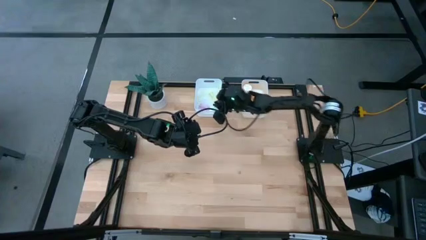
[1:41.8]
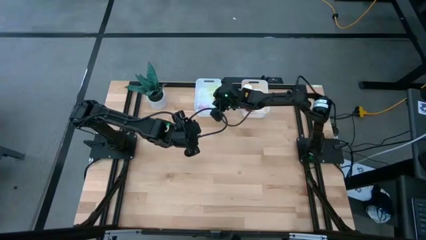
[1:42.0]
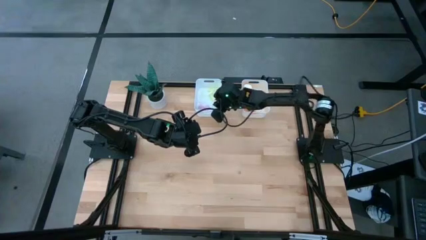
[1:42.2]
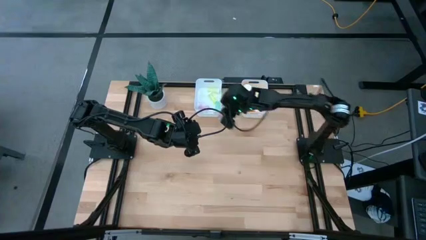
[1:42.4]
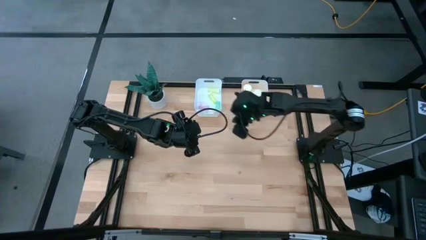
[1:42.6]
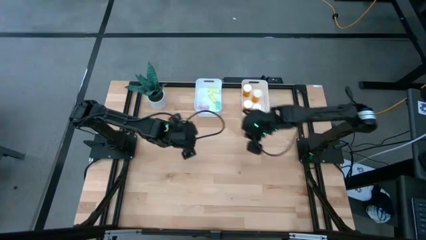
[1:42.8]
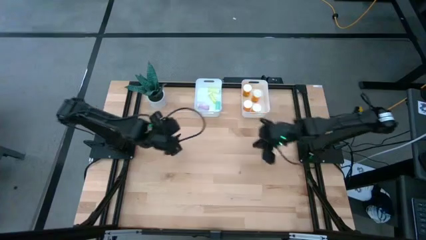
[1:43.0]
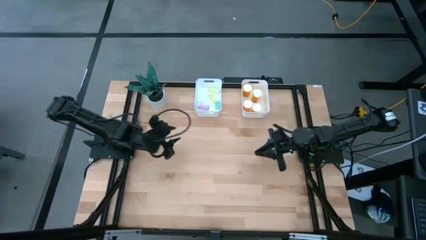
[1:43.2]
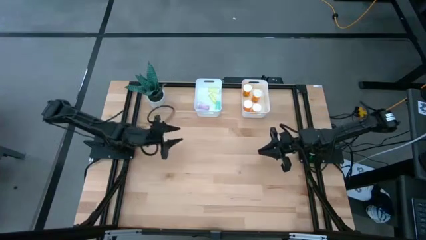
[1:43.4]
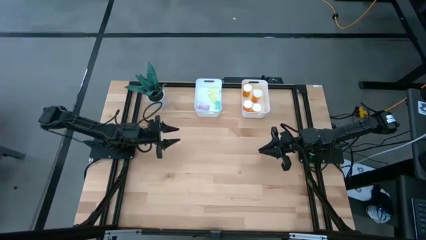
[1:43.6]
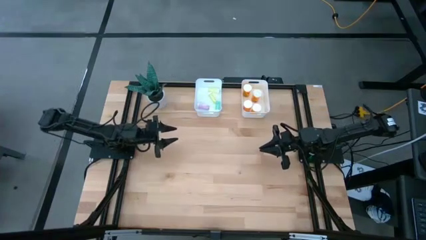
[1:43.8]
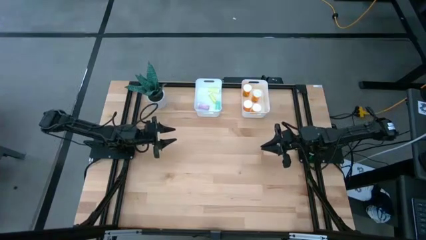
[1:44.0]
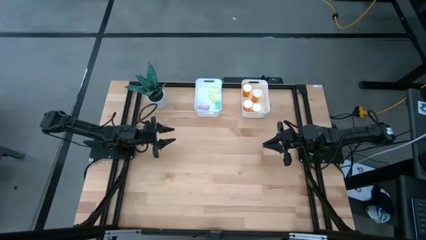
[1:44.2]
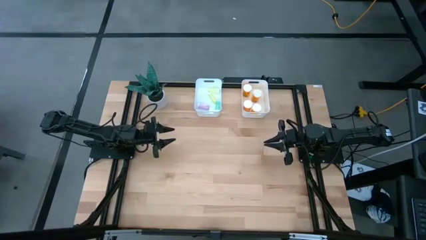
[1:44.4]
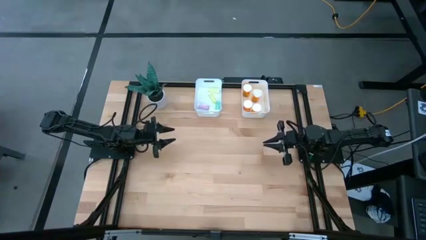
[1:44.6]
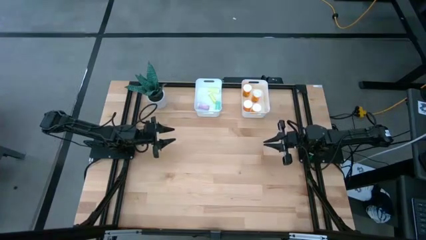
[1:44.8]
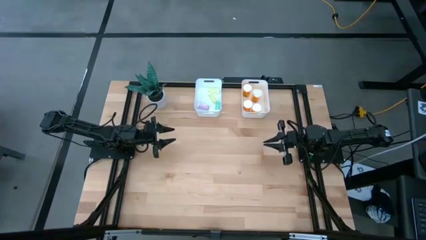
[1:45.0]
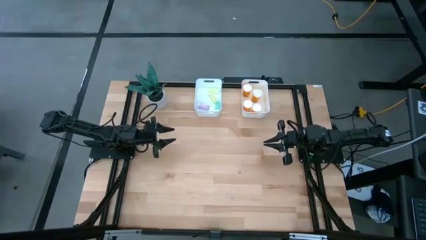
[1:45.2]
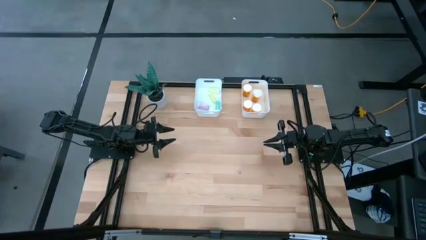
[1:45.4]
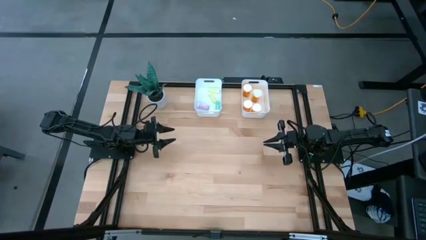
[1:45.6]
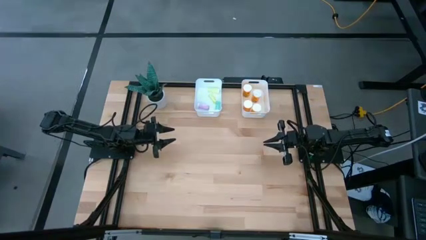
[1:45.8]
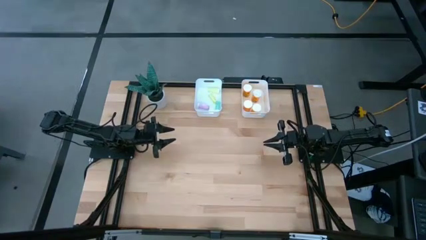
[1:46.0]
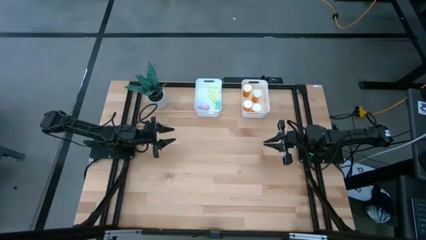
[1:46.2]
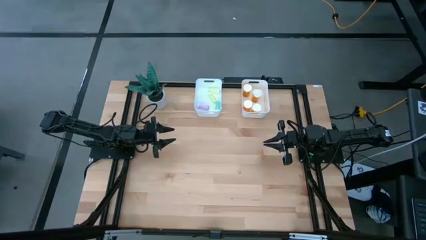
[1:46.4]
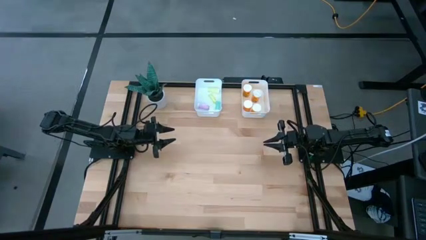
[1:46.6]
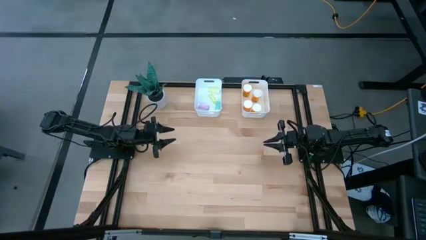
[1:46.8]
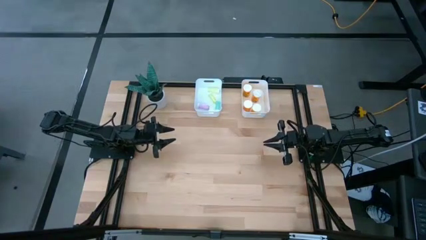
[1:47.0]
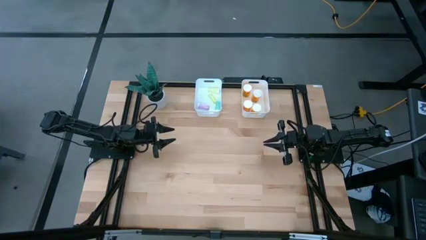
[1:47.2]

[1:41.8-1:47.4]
Task: Pick and place medicine bottles into bin by pill shape (circle, oval)
Return to Home Position

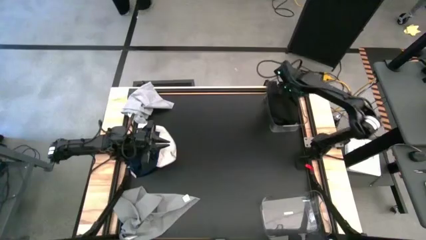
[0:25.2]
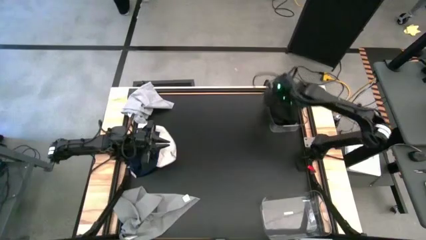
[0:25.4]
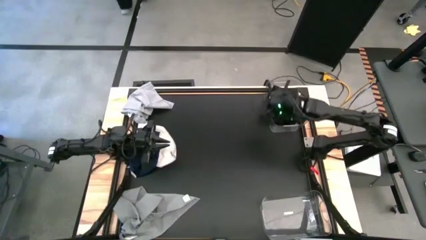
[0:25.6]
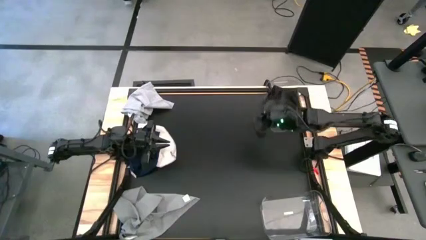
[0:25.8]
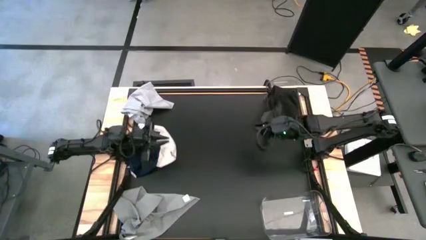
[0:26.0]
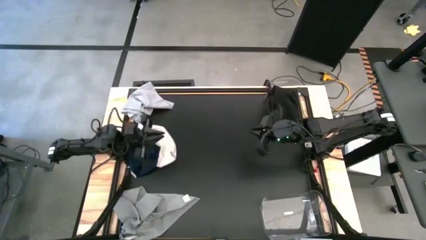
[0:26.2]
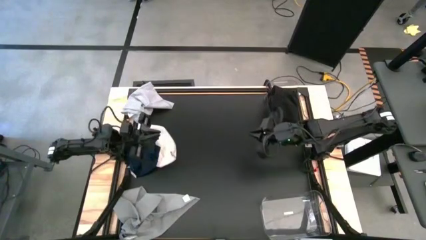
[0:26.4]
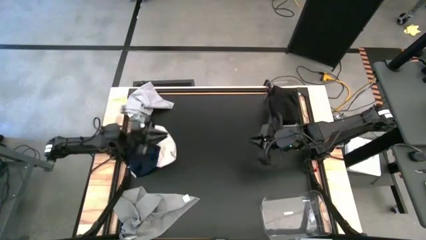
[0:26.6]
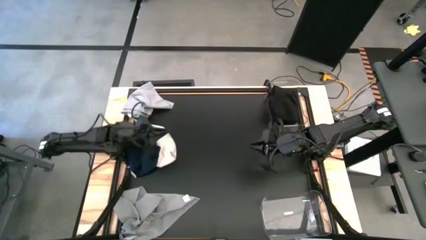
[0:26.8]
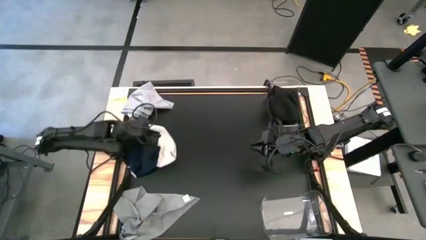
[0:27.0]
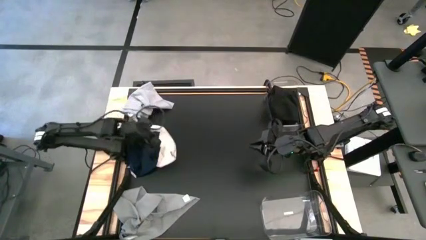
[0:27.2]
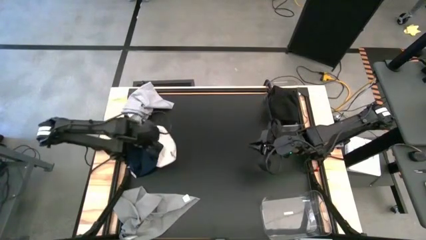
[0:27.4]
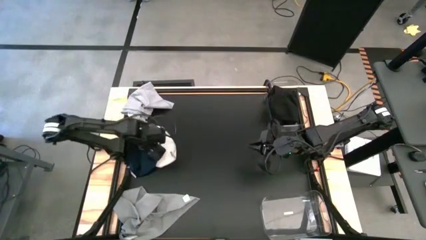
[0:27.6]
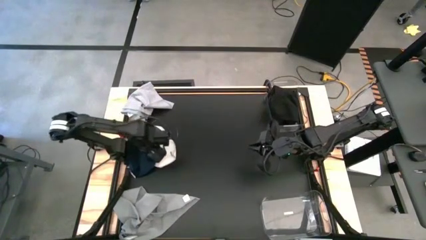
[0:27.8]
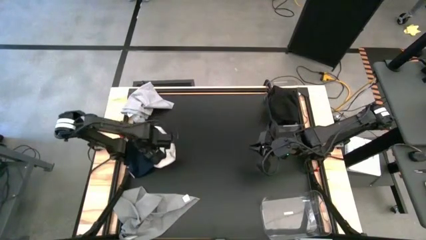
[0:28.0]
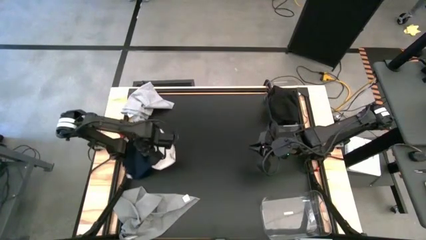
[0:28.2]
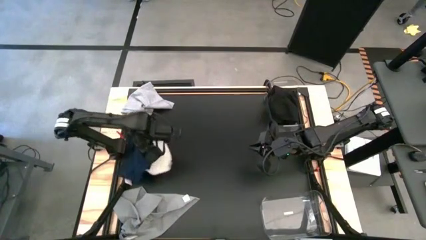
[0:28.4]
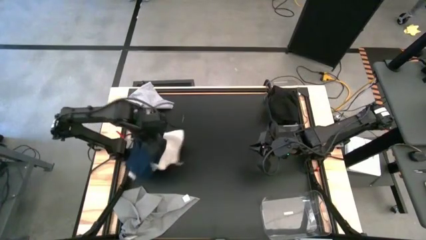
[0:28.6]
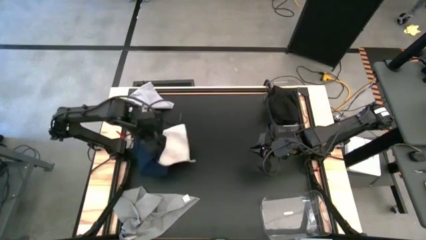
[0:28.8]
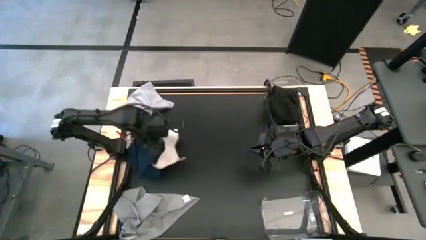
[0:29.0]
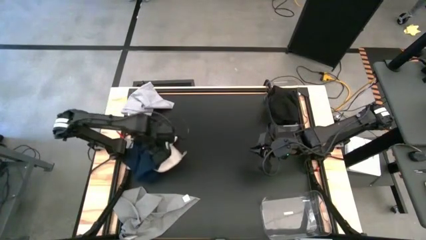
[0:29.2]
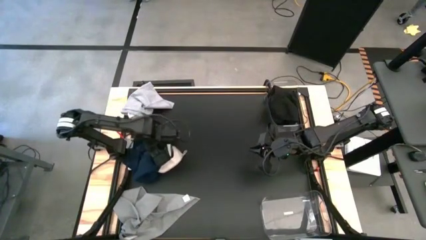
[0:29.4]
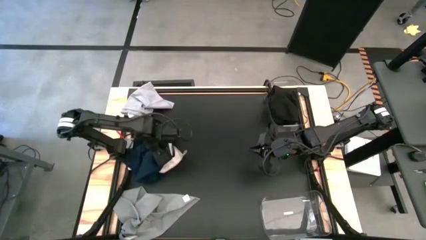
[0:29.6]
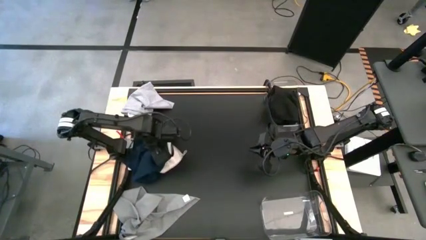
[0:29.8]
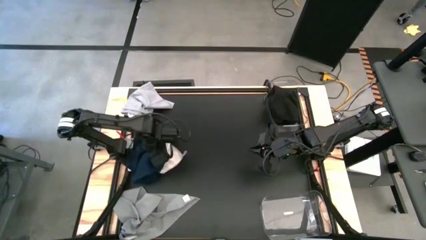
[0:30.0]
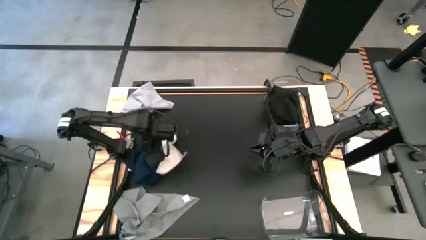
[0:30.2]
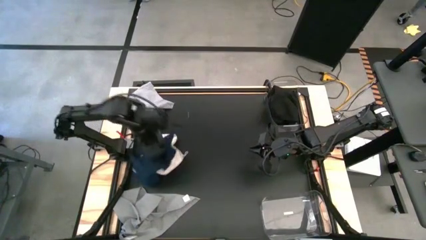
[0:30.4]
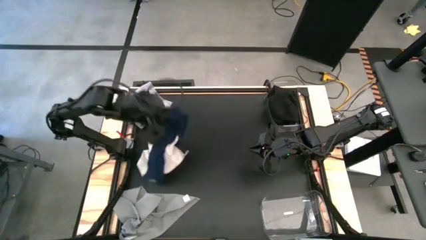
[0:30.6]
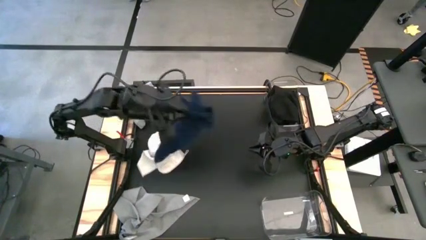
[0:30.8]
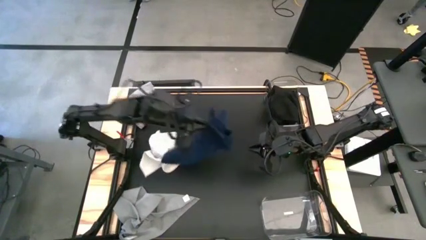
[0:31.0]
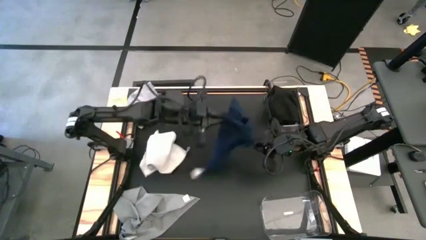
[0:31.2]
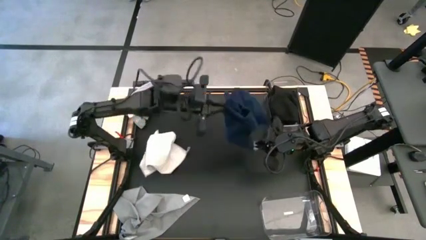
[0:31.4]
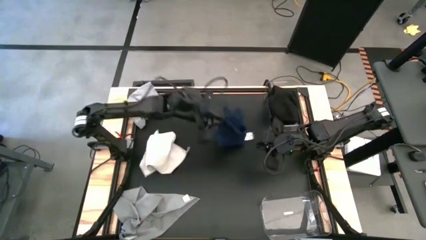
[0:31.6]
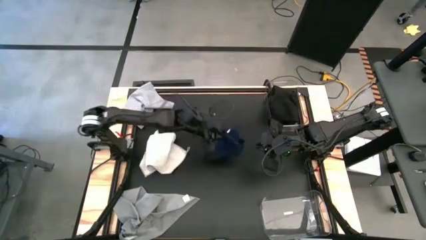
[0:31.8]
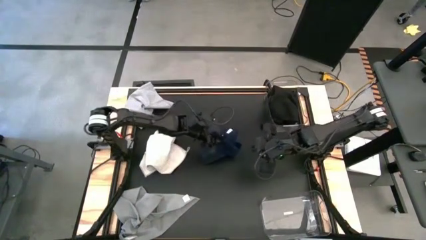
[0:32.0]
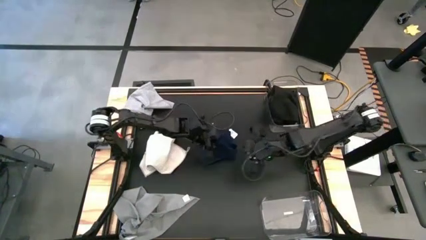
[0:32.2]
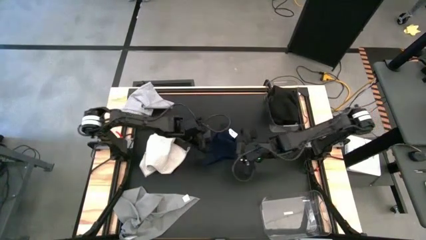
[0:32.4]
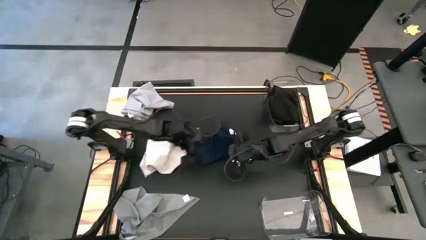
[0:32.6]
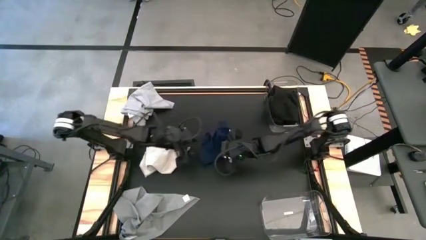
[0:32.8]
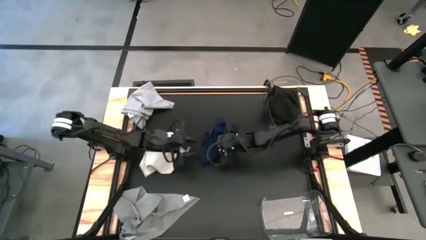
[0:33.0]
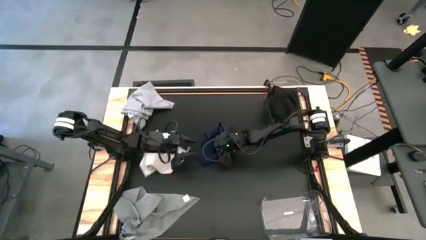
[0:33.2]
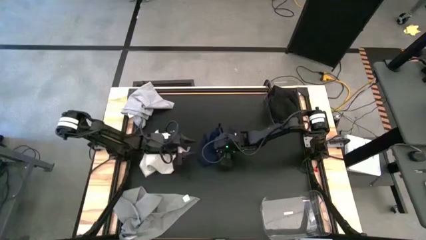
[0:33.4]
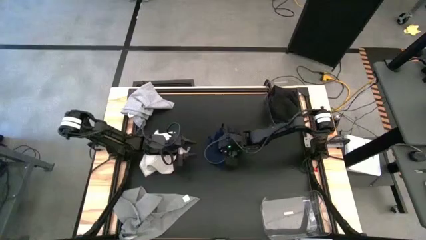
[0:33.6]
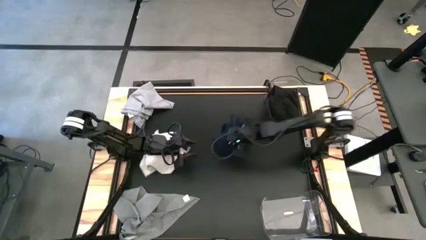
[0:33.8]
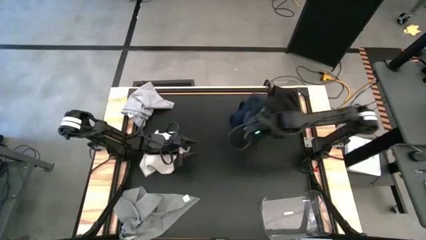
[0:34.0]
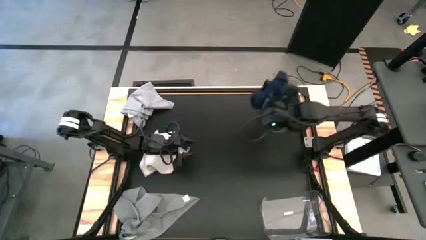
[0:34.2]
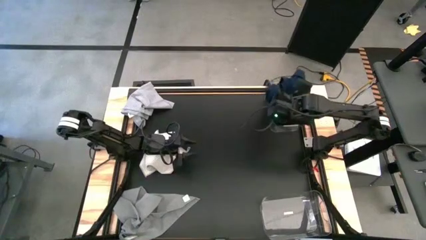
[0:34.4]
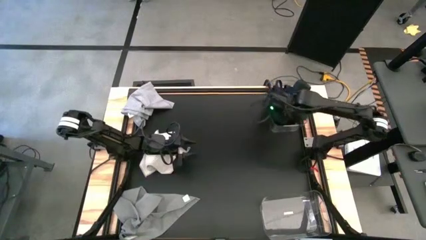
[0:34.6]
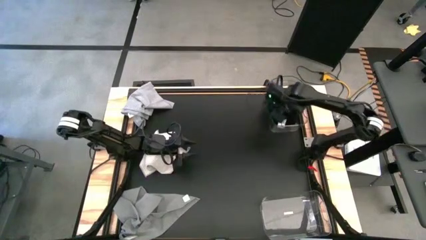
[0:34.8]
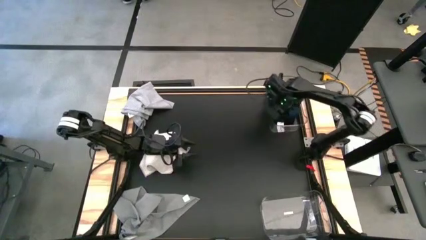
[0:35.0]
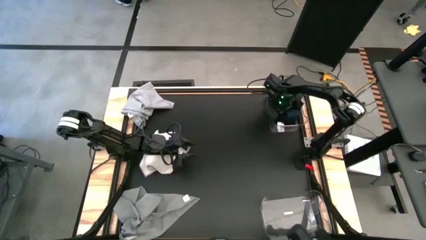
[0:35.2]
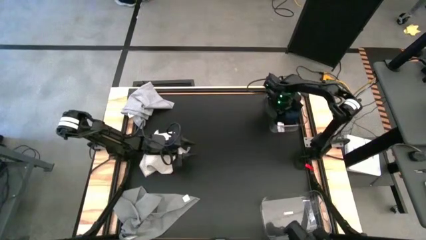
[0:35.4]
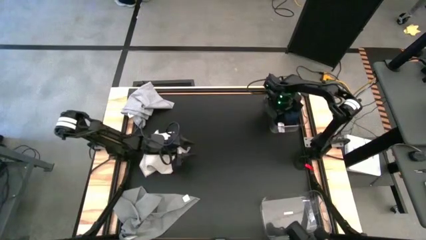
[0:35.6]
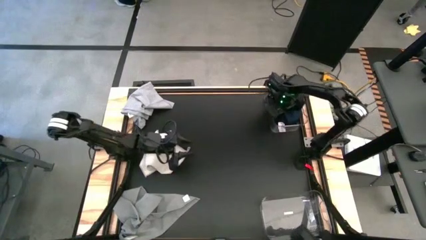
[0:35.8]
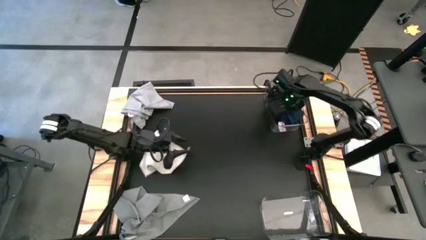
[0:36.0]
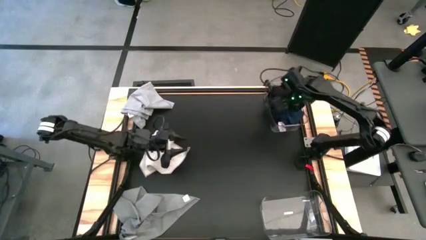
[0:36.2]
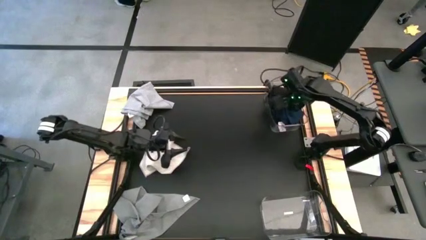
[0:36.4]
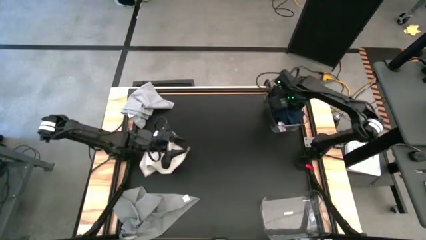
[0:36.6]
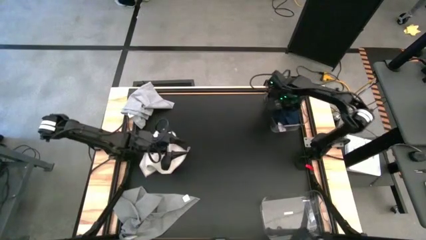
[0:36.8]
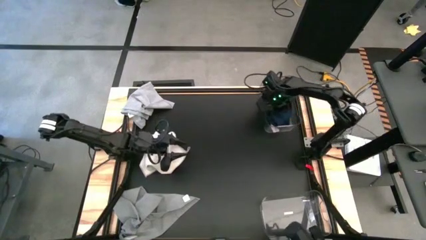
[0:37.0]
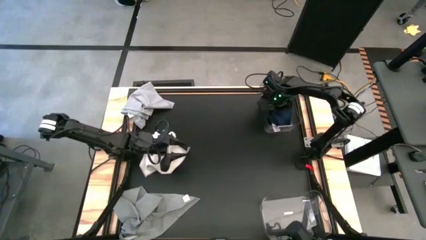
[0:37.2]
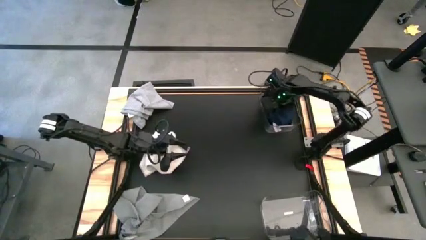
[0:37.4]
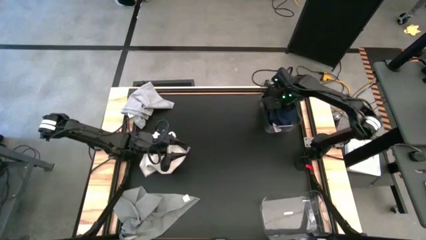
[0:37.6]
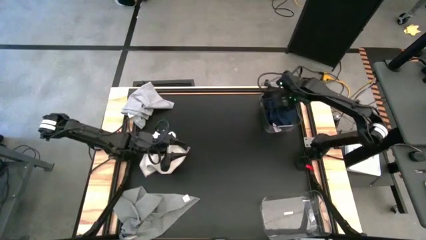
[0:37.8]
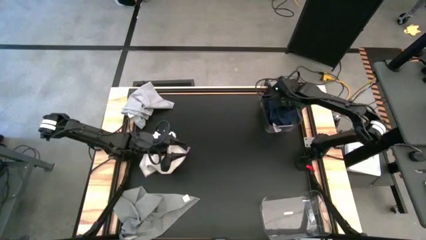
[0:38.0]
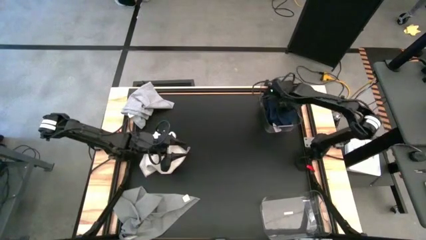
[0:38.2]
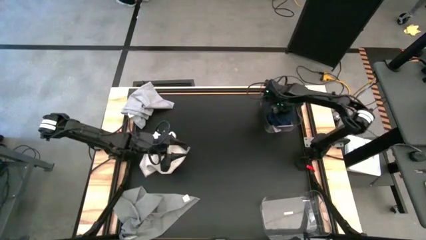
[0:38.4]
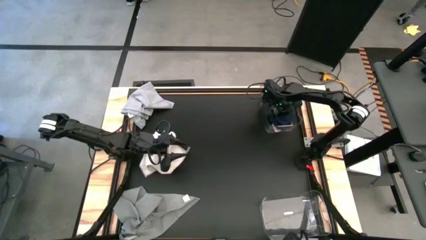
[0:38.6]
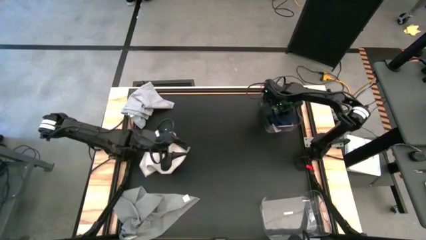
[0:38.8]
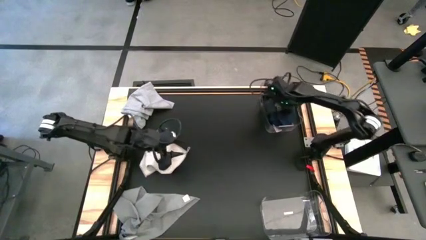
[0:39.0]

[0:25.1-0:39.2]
Task: Sort towels by color in basket
Put the dark blue towel into the top transparent bin
